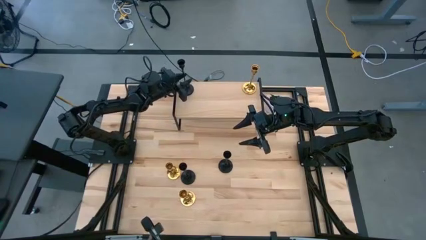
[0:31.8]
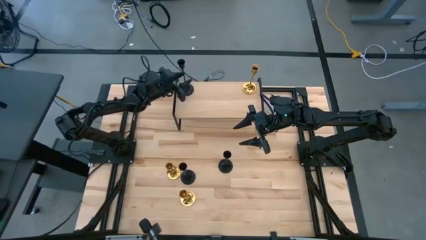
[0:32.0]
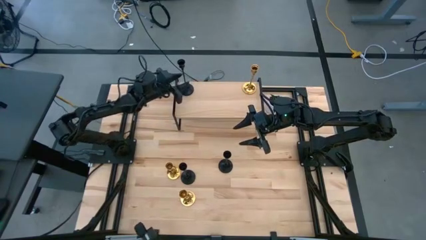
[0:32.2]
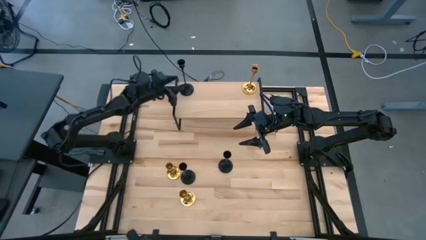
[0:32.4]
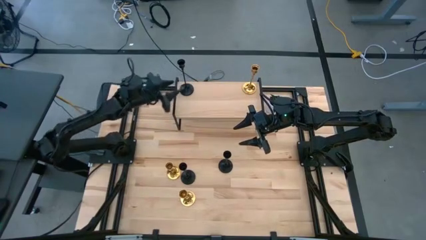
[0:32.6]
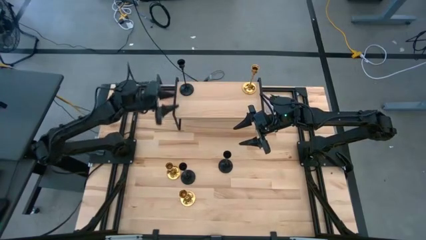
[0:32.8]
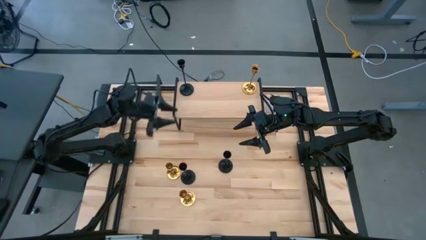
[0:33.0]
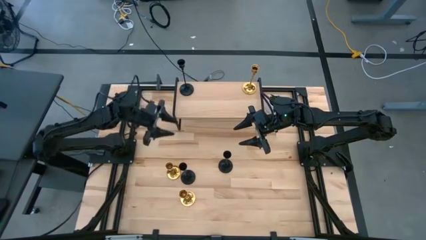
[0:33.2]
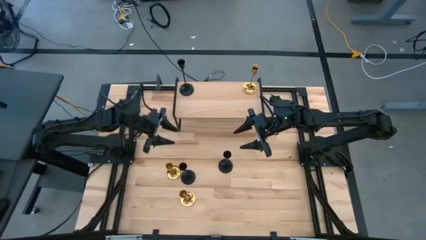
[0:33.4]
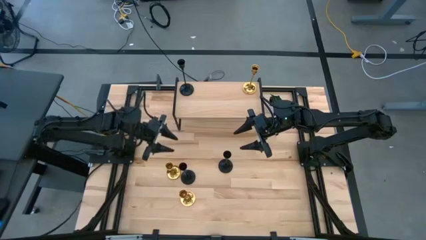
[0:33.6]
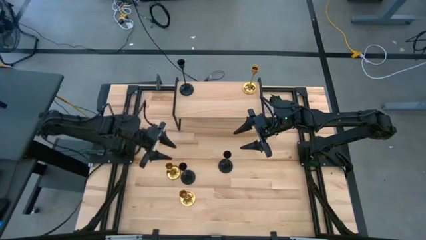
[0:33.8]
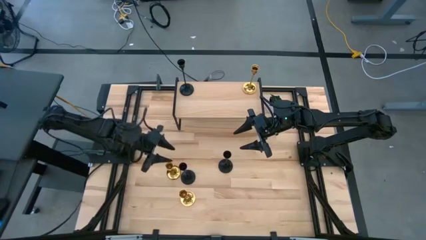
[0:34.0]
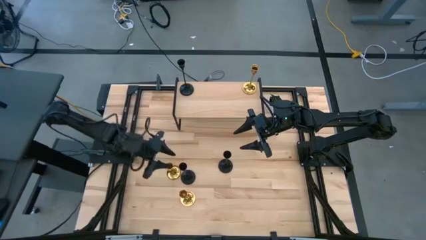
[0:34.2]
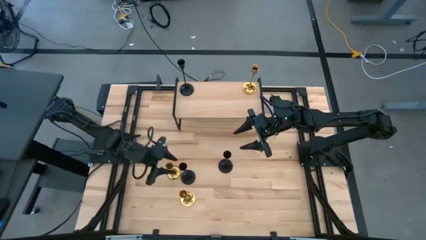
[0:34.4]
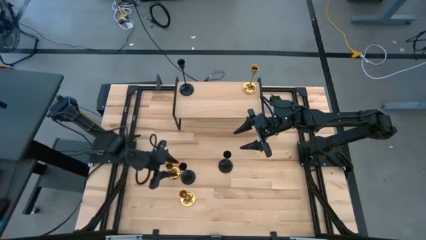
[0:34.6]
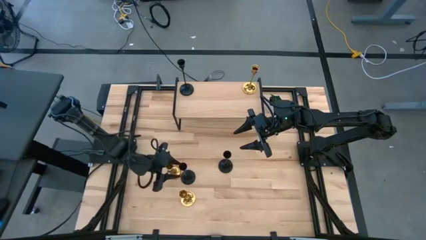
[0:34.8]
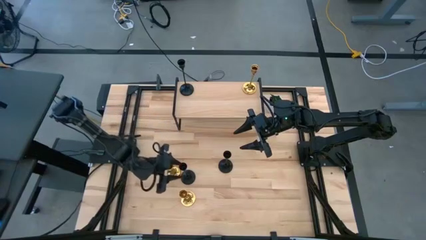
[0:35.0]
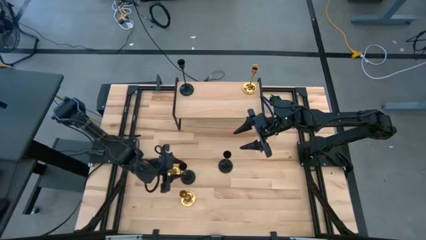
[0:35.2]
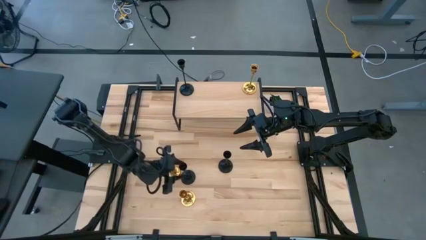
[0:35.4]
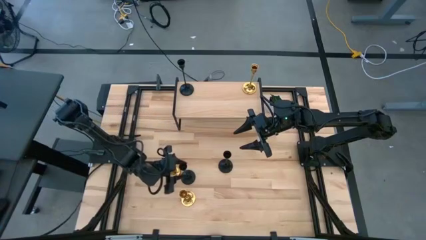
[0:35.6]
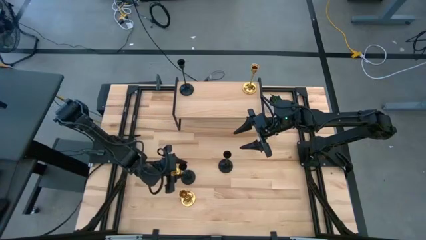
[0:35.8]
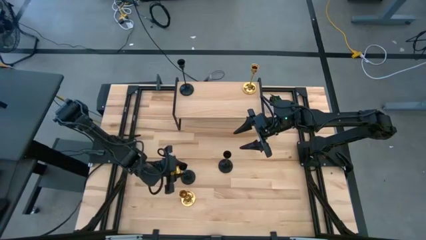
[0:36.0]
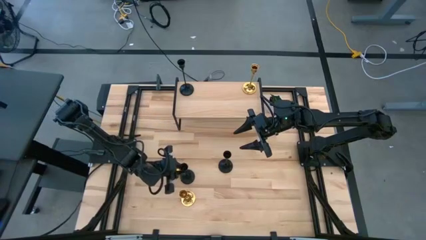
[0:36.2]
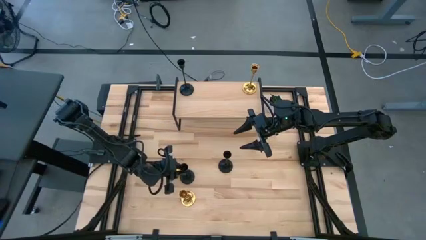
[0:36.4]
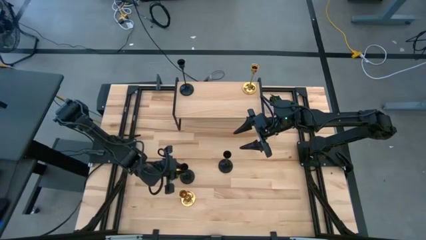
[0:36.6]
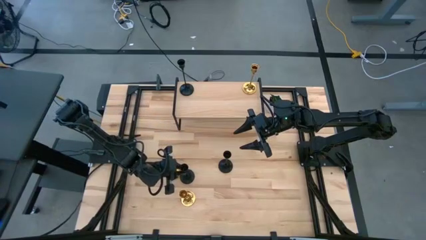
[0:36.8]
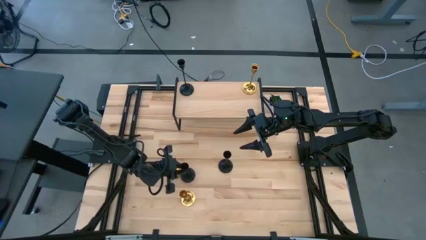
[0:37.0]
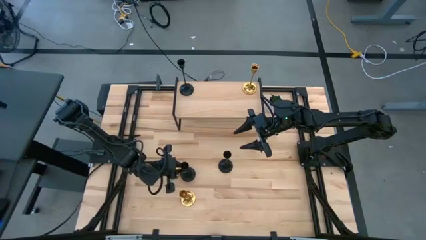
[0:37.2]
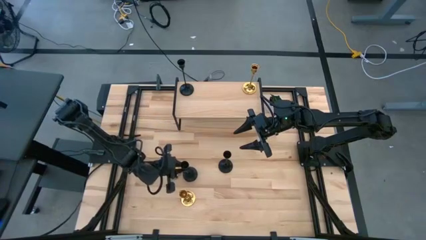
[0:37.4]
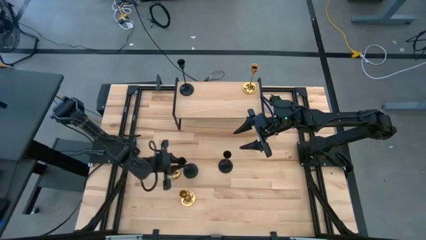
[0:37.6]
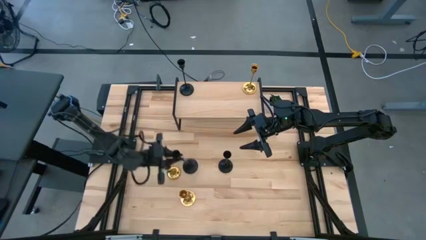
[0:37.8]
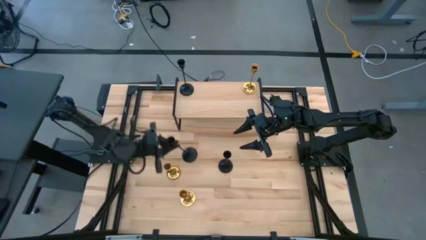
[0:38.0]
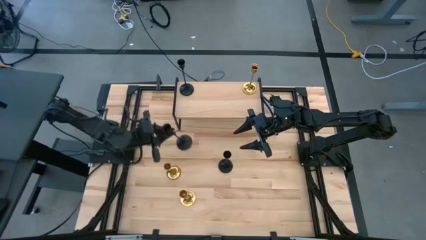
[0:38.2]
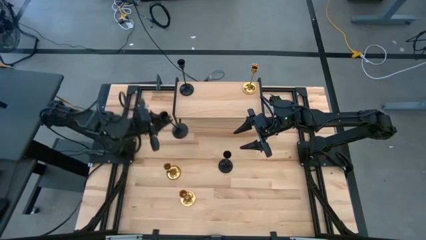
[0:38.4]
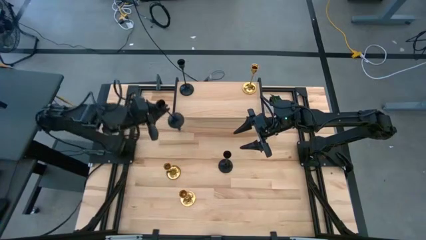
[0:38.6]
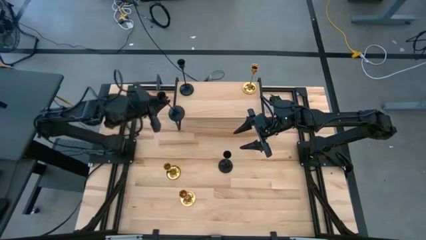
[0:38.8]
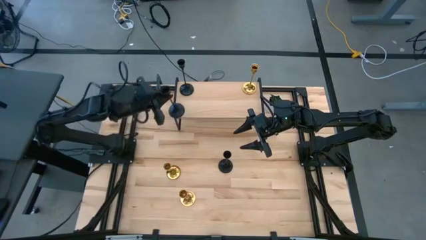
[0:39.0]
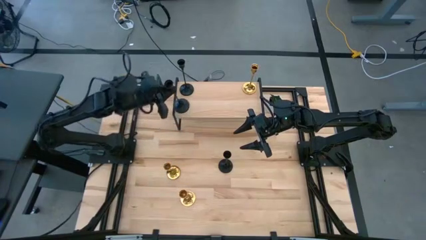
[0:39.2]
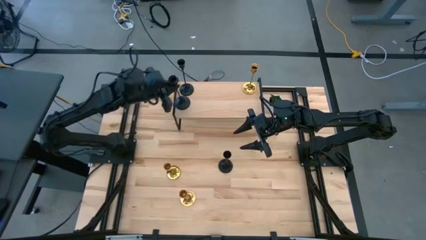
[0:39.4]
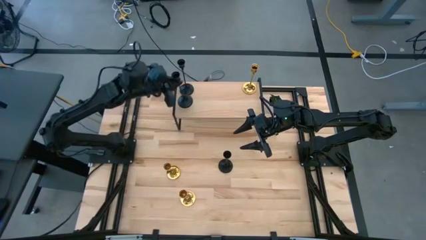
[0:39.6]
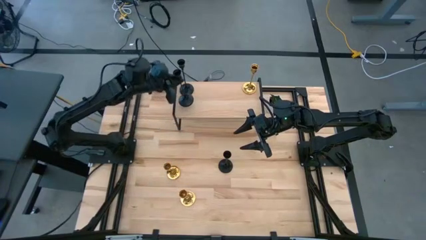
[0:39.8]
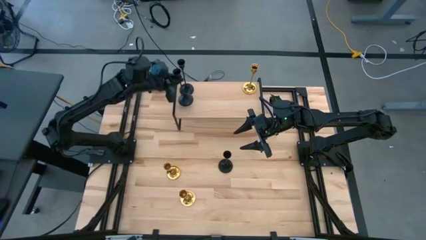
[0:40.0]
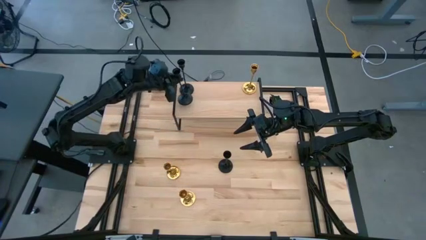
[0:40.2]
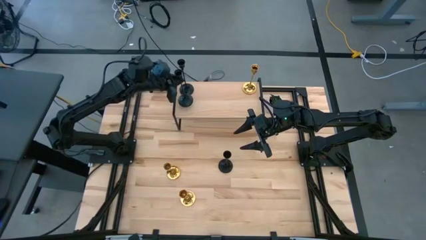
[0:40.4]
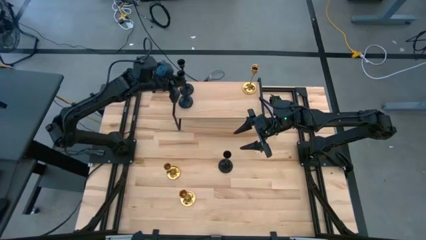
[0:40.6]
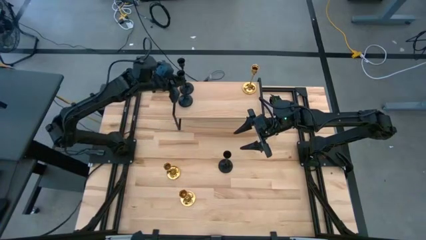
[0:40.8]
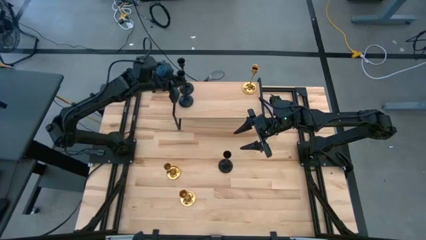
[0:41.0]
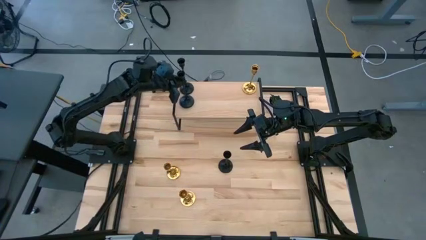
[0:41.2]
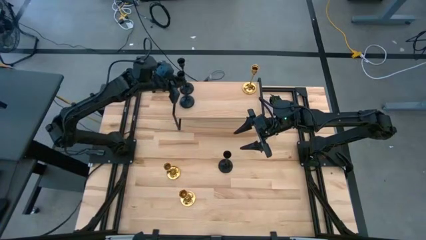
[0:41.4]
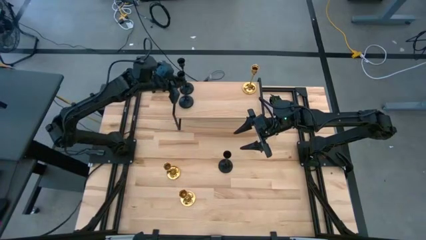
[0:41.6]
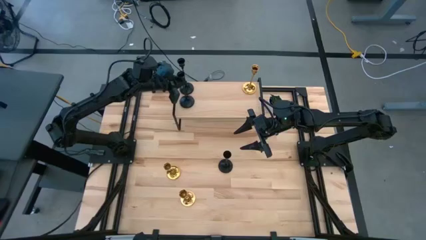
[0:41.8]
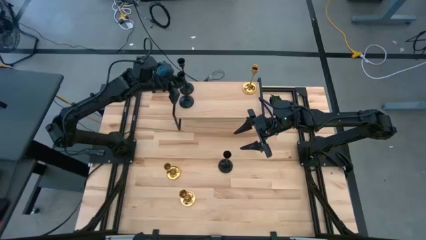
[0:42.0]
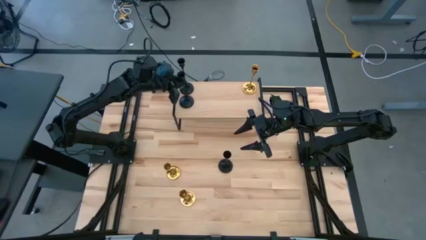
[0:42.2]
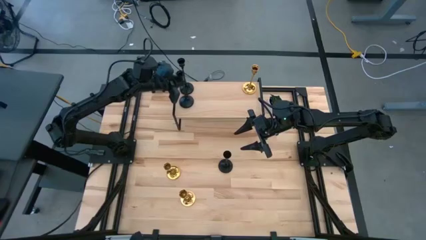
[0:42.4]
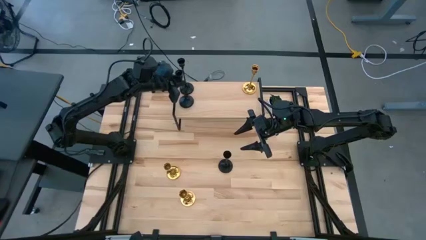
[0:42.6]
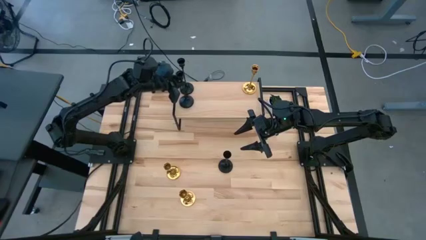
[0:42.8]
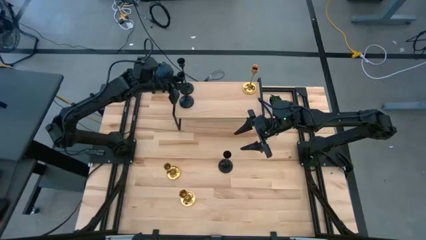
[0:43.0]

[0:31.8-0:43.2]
Task: Pick & Place candle stick holders
Put the left black candle holder on the shelf aligned with the black candle holder

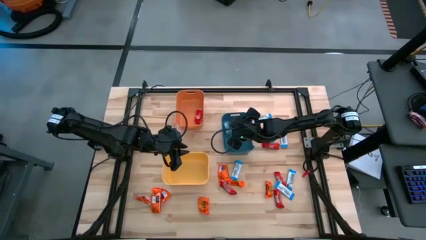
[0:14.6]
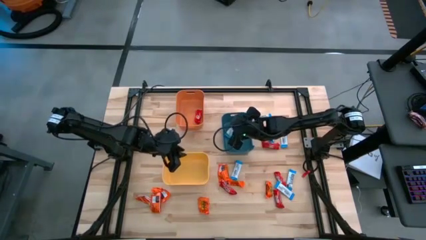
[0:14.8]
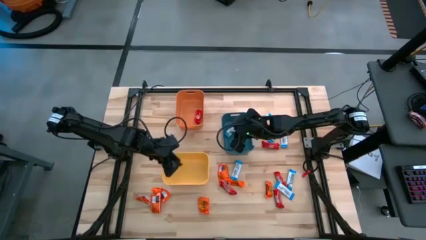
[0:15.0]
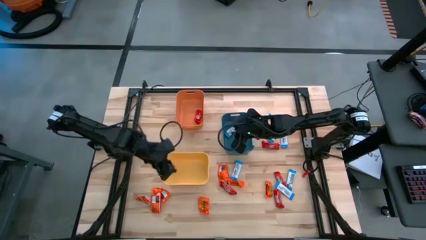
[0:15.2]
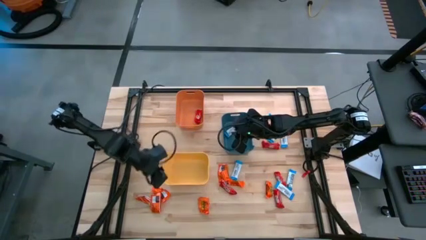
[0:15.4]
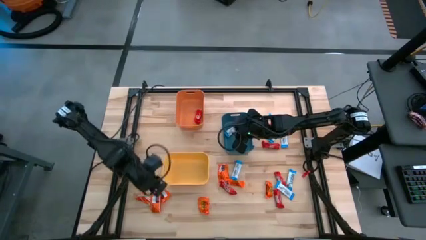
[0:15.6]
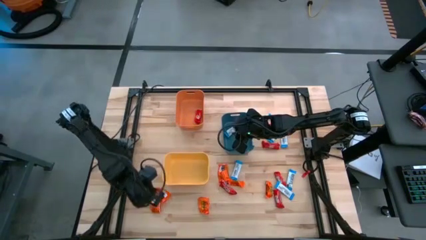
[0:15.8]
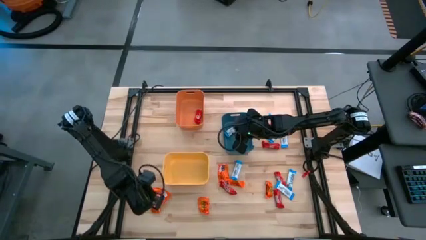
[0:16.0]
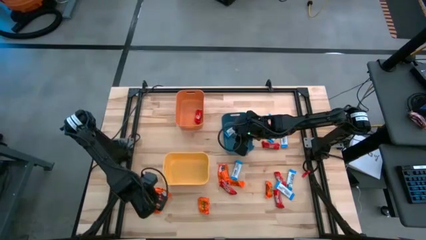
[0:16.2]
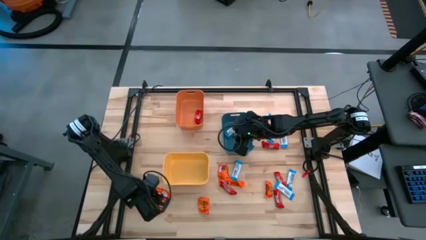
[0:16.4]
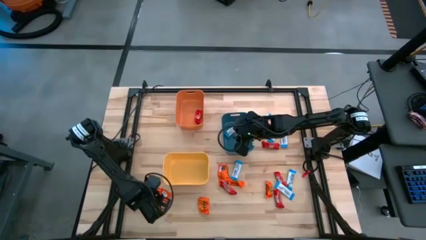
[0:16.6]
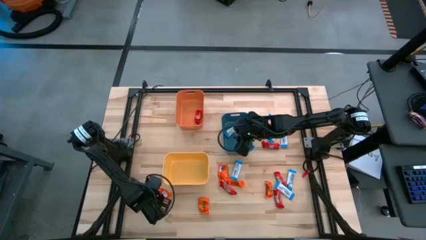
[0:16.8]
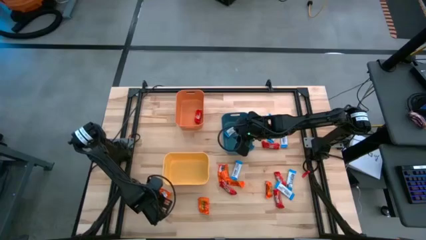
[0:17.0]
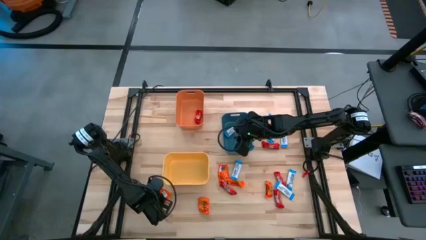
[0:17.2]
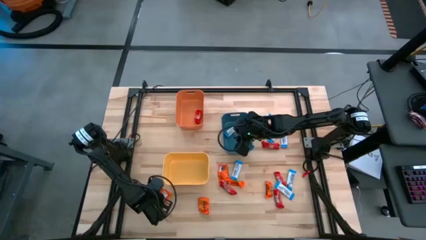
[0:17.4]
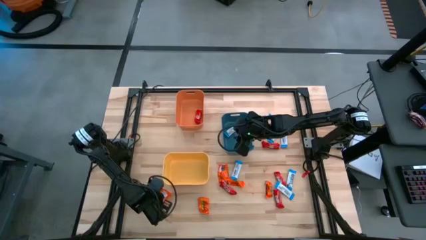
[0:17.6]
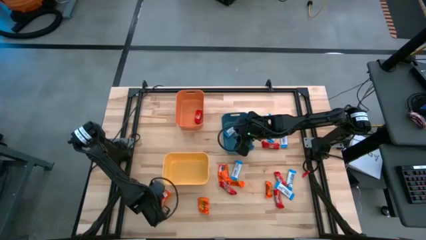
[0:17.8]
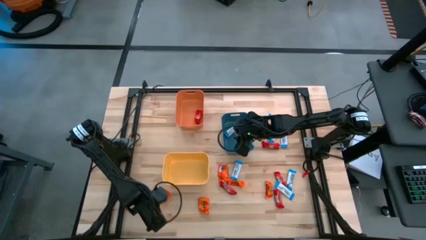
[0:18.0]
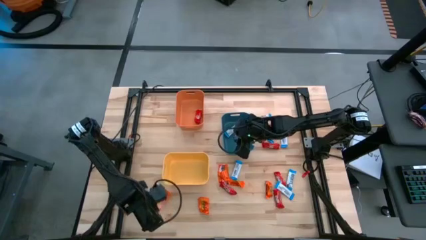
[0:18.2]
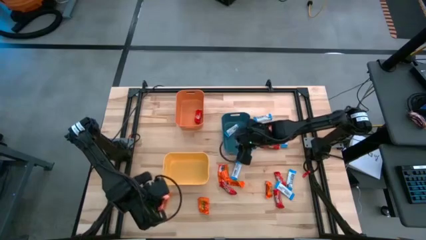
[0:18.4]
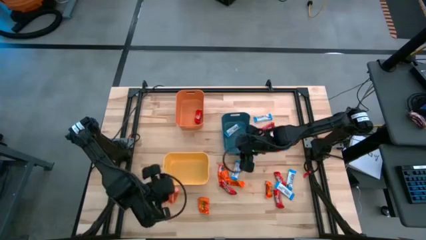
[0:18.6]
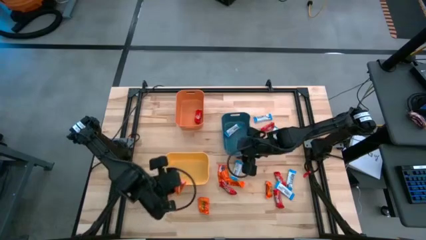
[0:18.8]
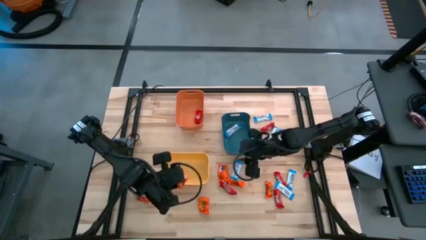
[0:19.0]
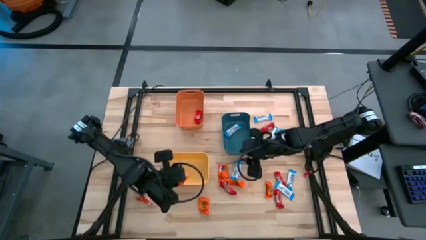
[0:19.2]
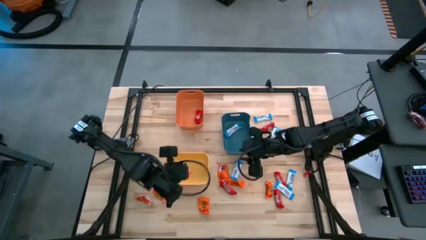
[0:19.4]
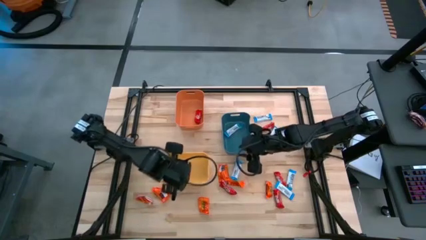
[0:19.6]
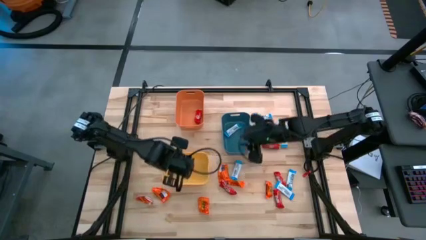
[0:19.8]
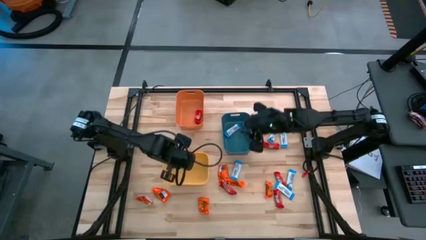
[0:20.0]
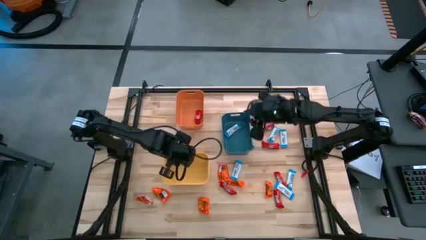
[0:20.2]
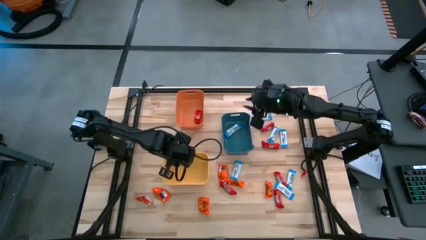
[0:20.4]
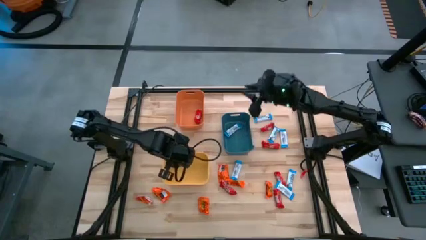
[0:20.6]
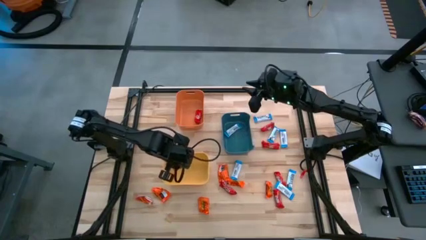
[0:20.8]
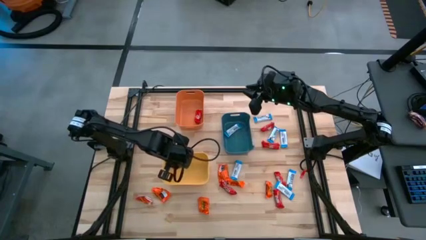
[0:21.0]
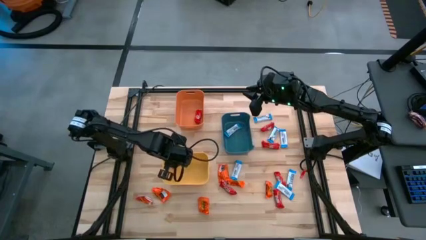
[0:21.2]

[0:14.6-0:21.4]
Task: Organize candy in baskets
Put the orange chocolate into the yellow bin
